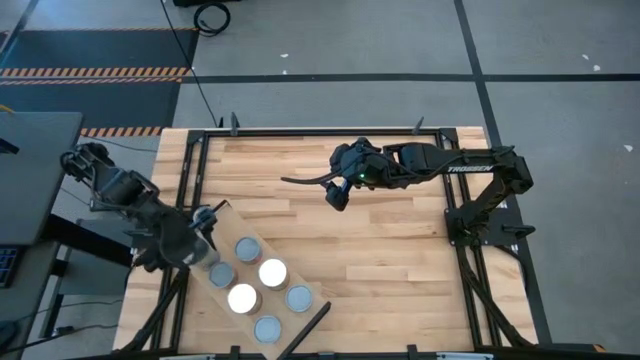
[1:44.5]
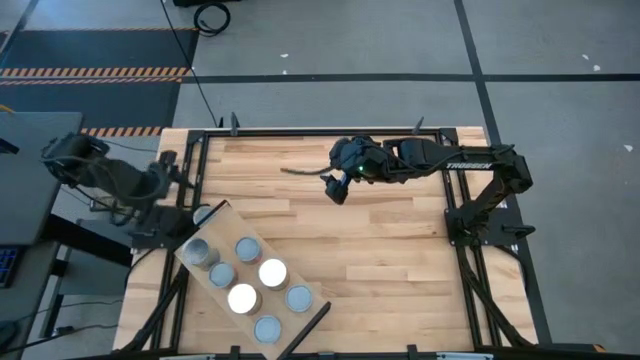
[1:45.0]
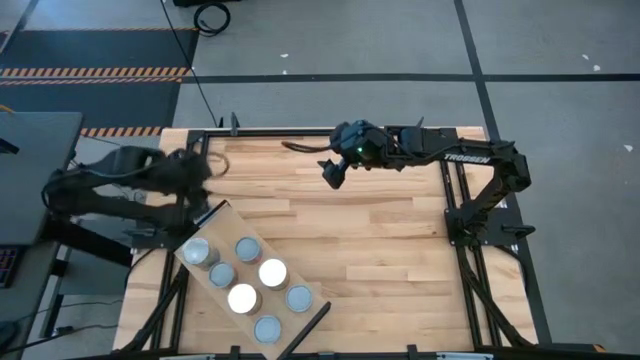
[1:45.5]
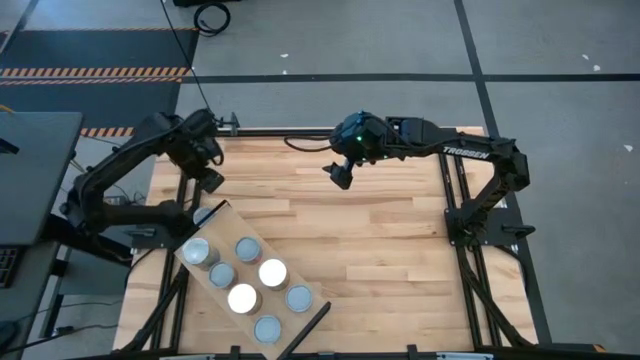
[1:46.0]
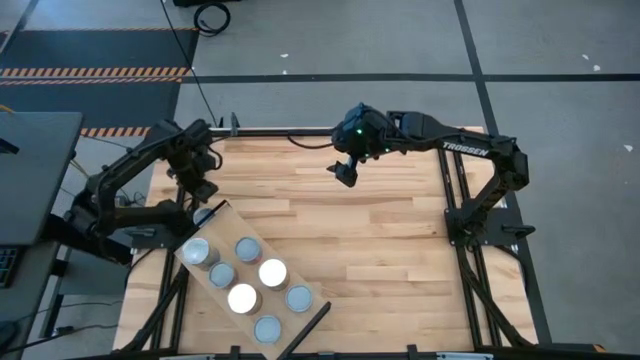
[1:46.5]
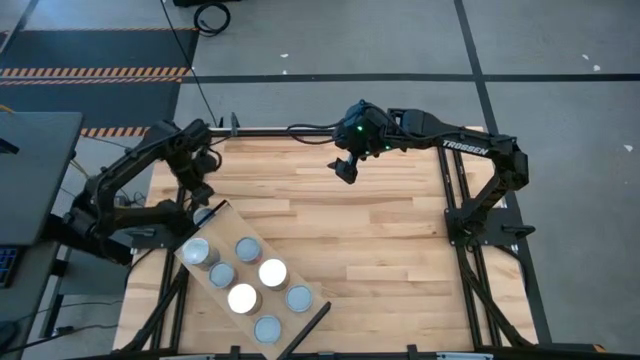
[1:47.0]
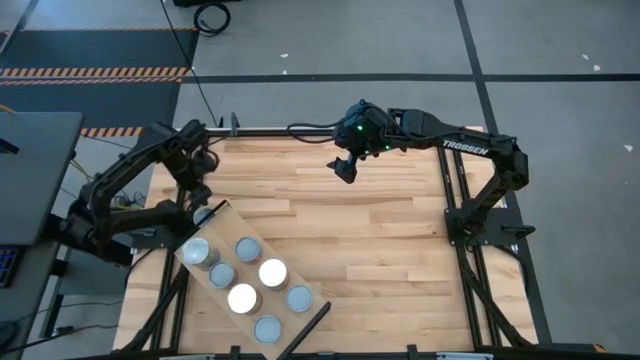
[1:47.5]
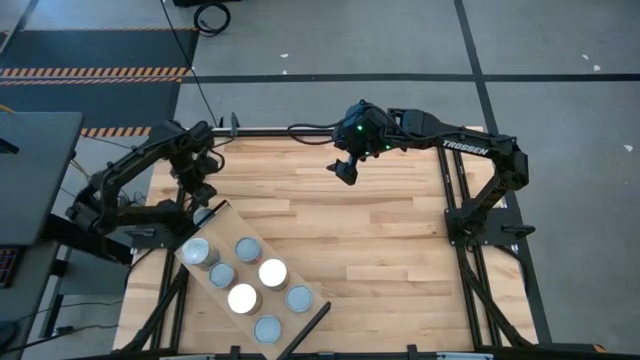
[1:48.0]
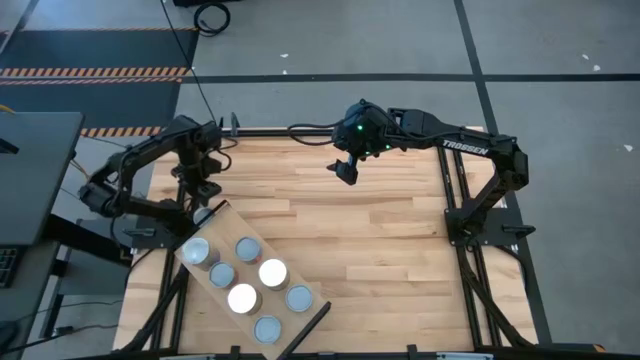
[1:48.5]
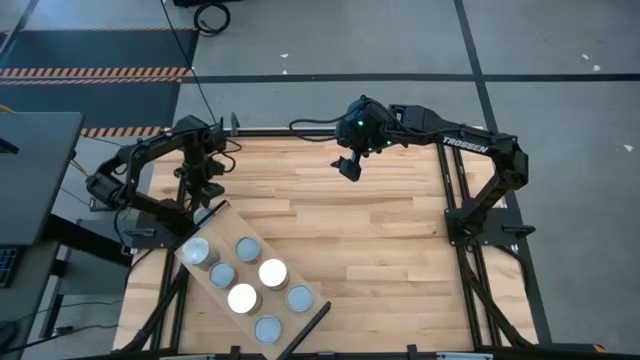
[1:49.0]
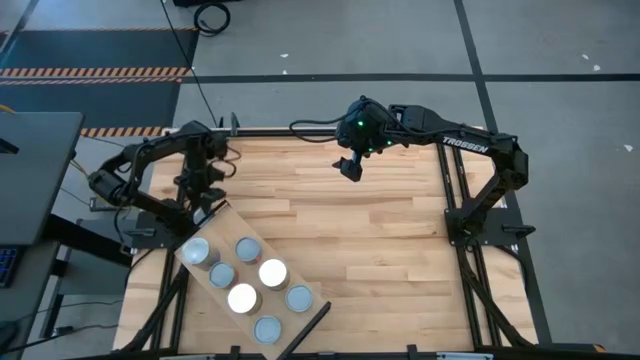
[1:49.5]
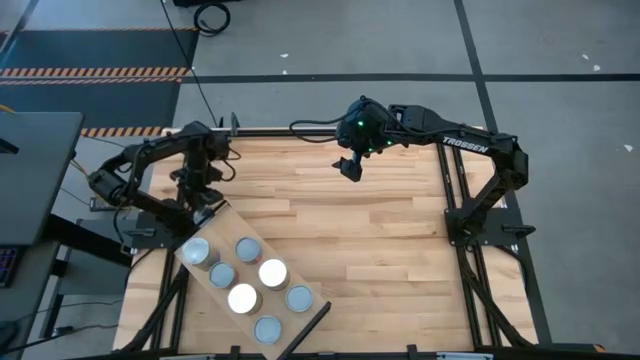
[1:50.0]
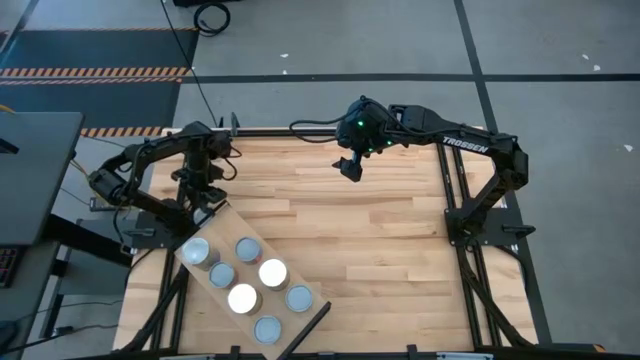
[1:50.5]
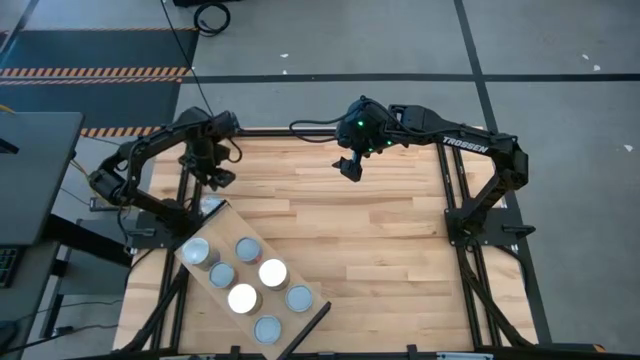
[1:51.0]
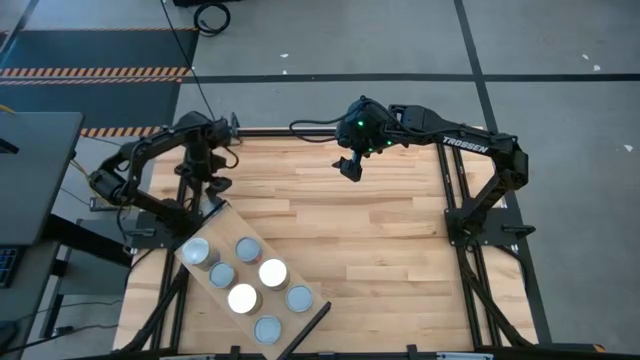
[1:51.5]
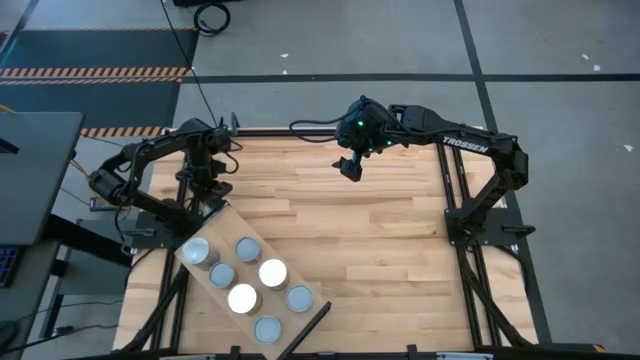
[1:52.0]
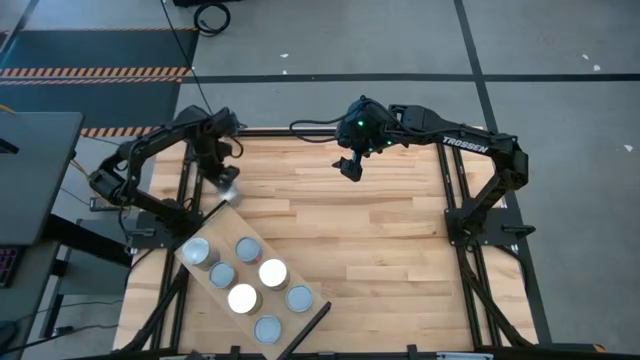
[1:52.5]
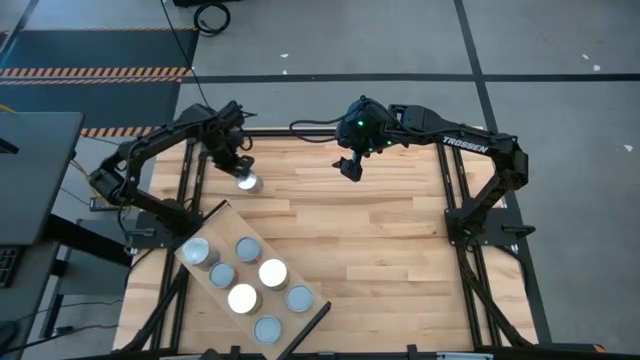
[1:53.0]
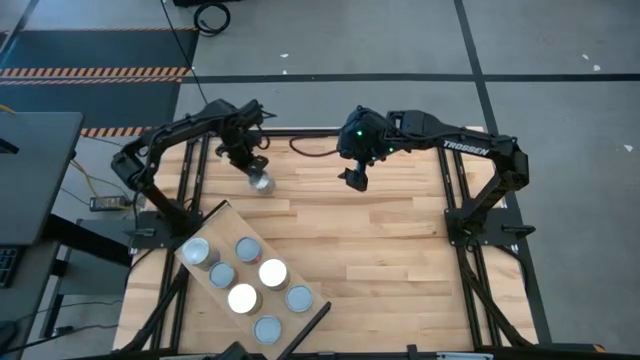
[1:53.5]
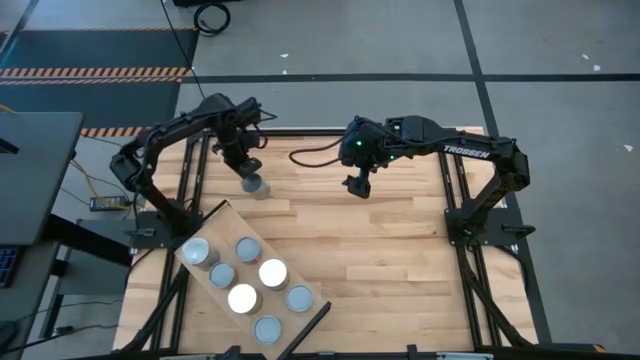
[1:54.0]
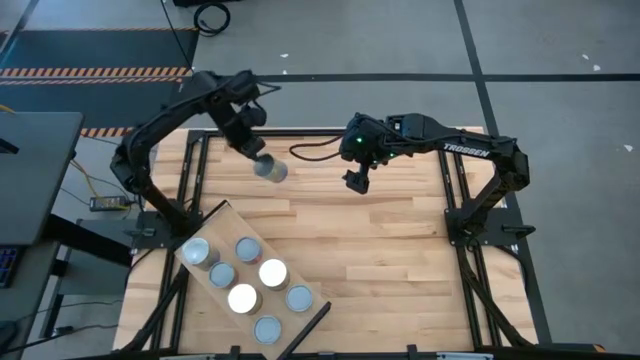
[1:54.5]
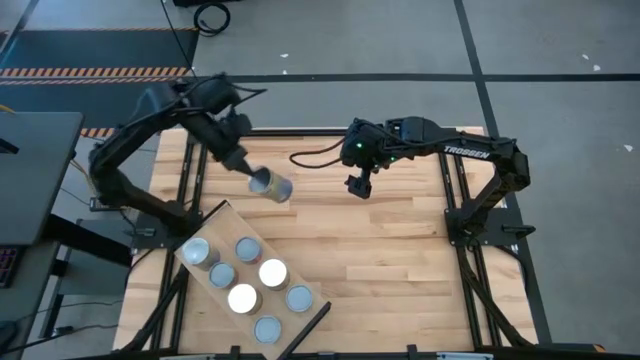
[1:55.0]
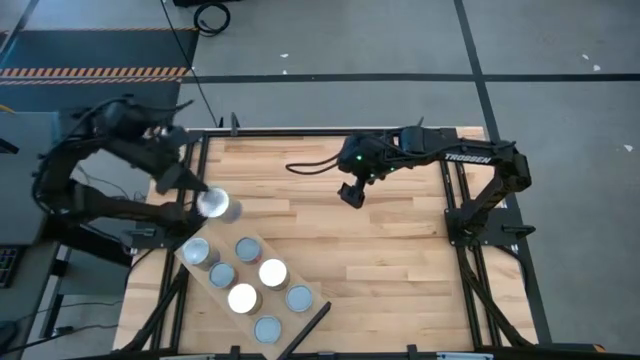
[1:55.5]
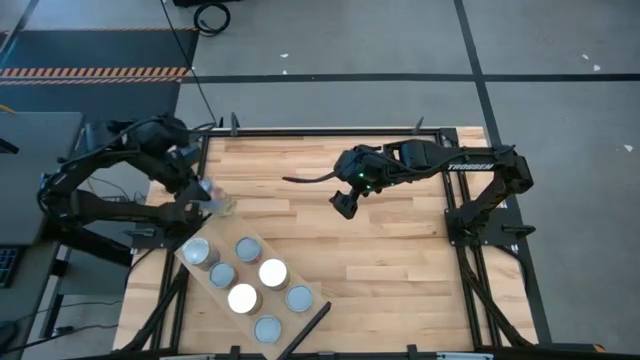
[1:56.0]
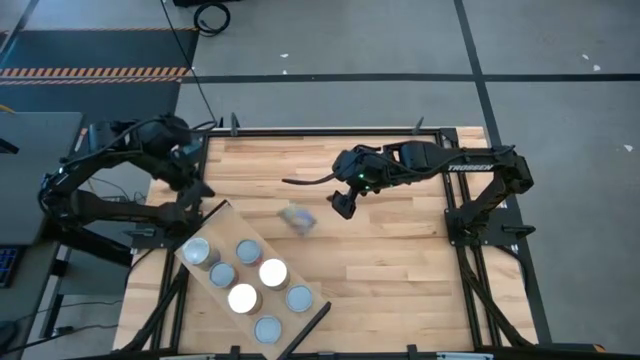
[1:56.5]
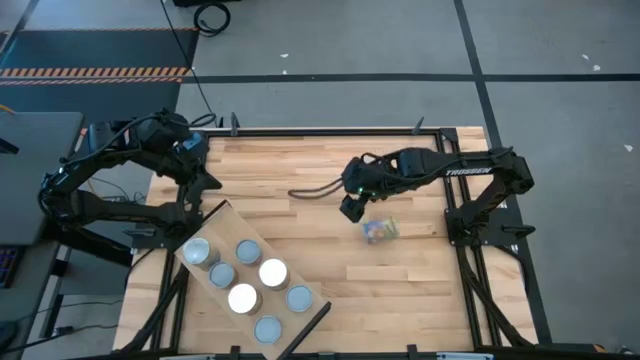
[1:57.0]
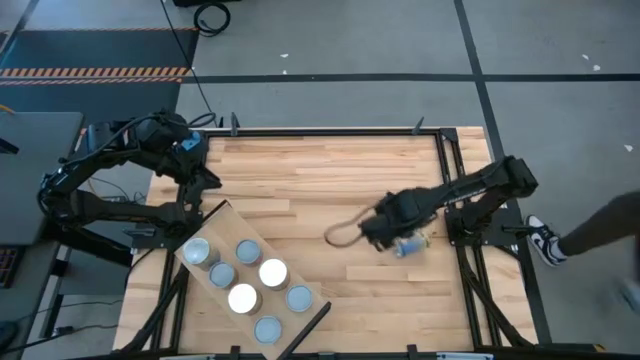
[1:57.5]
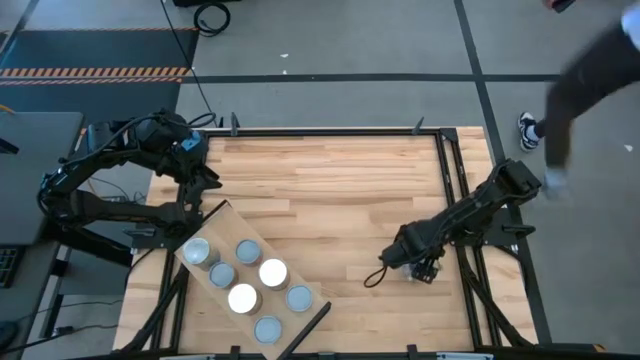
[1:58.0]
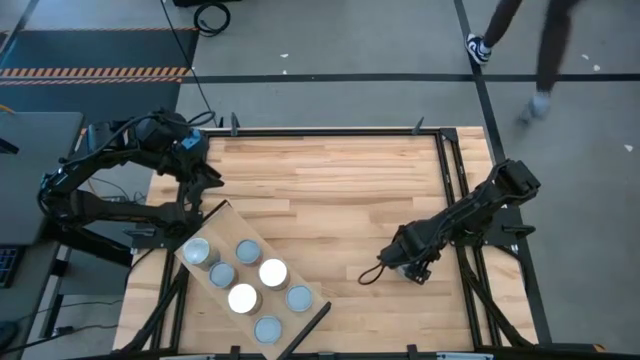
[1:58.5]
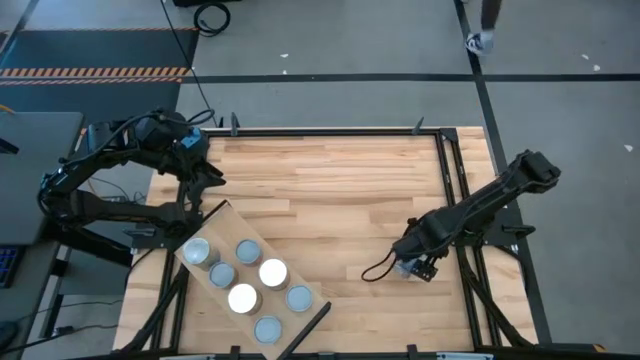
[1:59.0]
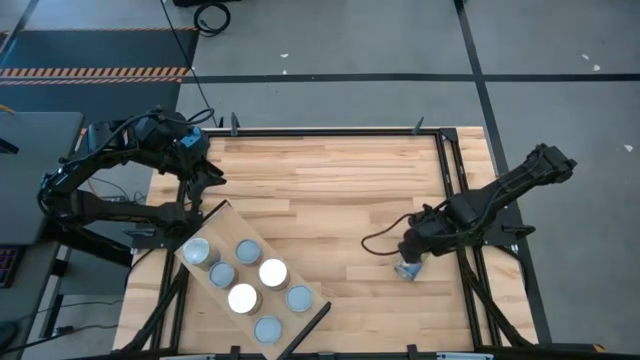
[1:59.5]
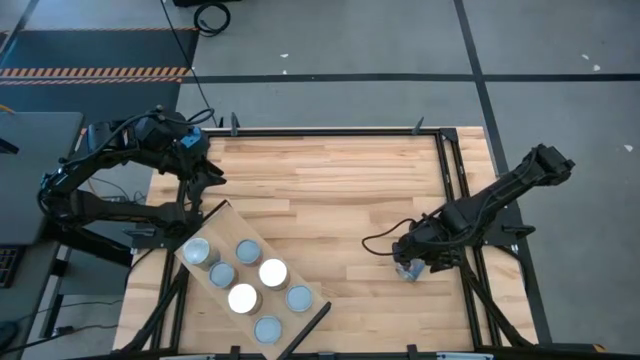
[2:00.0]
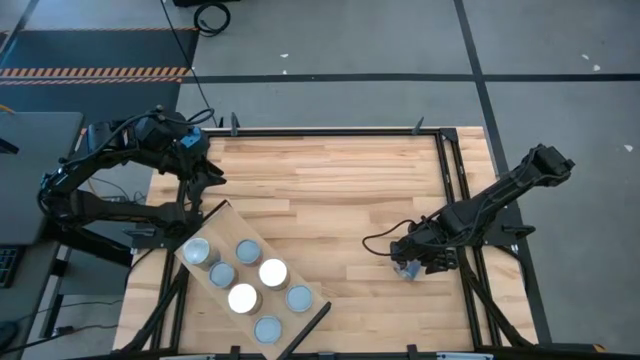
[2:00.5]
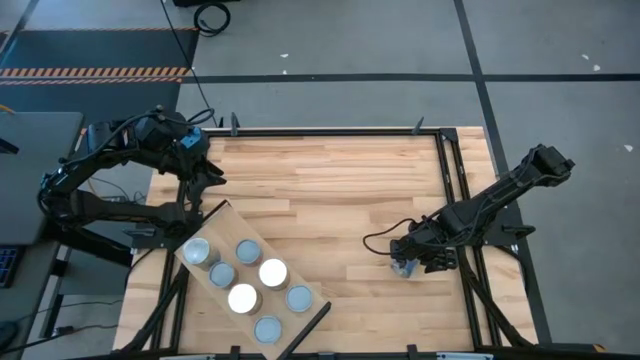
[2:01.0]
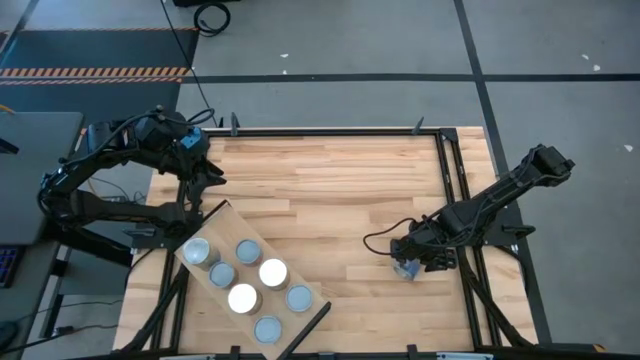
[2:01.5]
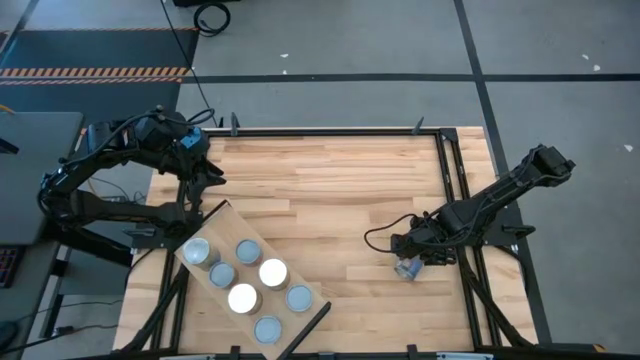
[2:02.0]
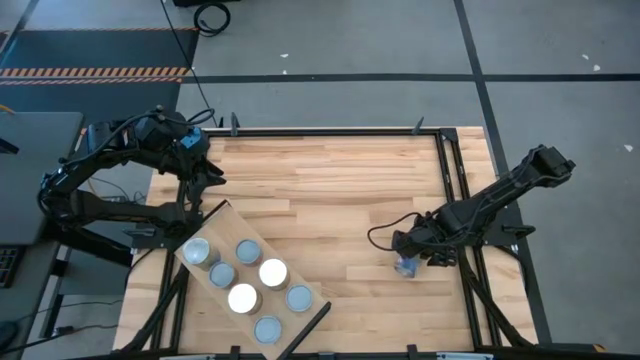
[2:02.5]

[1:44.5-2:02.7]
Task: Pick and place cans onto a shelf
Put the canned peaches on the shelf aligned with the other canned peaches

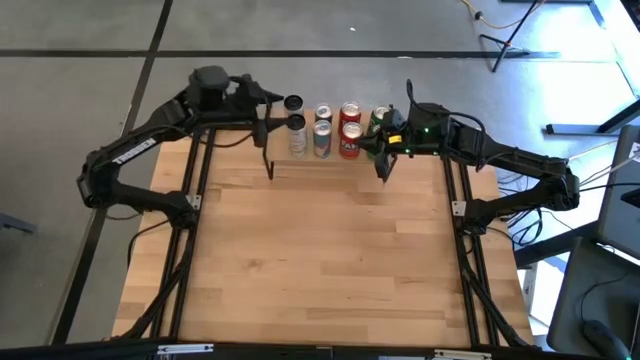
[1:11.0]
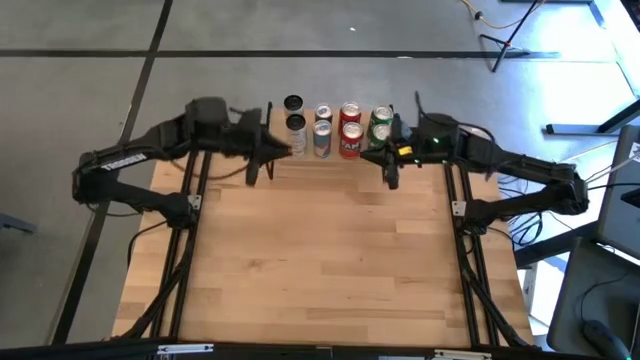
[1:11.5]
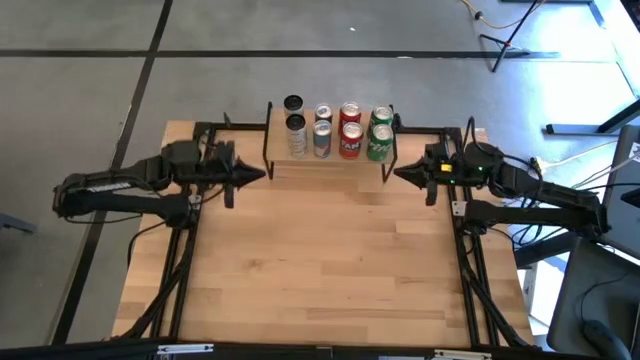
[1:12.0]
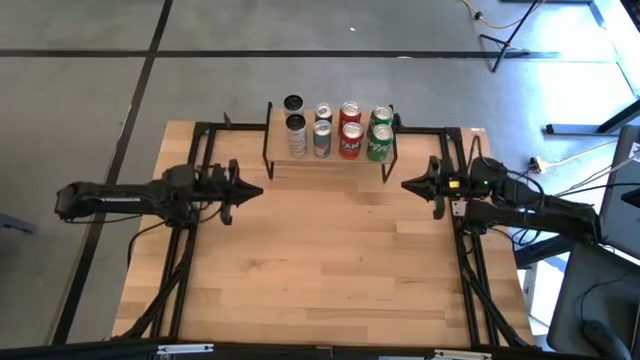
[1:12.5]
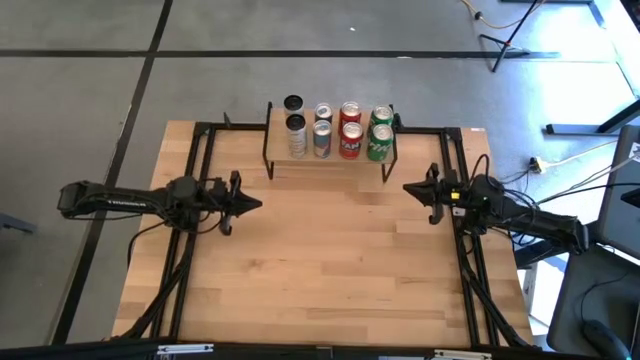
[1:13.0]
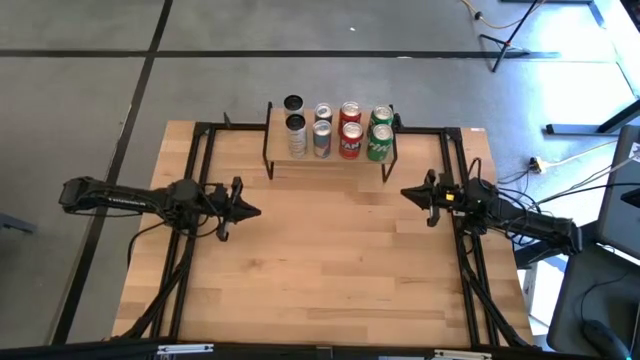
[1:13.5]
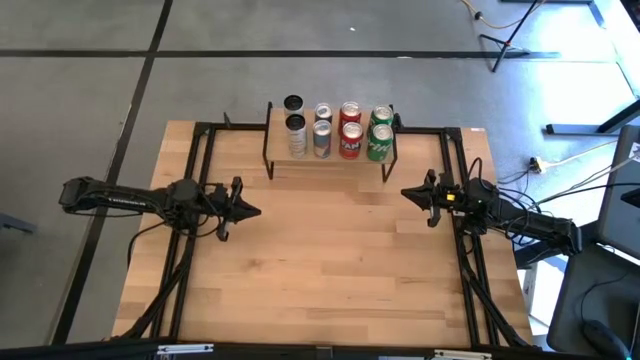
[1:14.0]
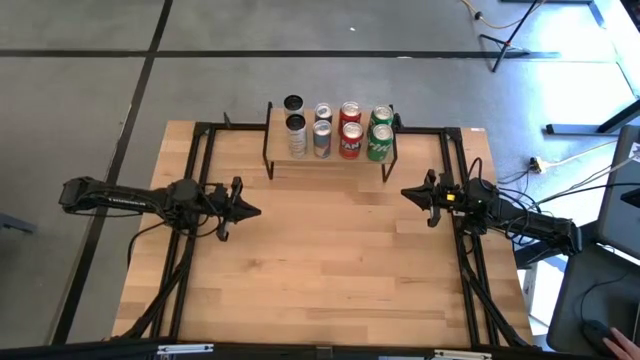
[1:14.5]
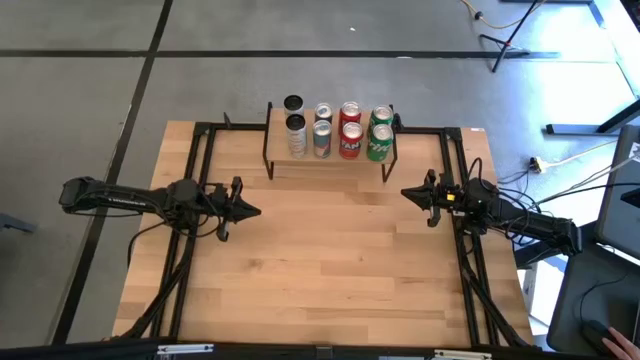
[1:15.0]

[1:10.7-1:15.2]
Task: Place canned beverage on shelf
Return to Home Position
